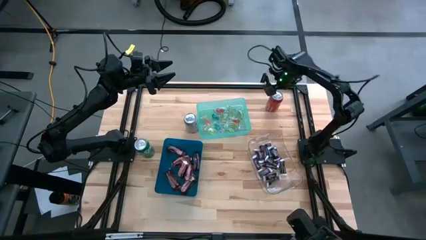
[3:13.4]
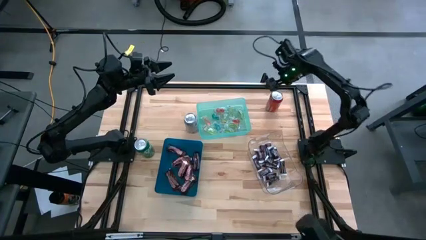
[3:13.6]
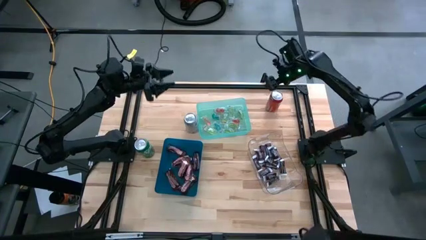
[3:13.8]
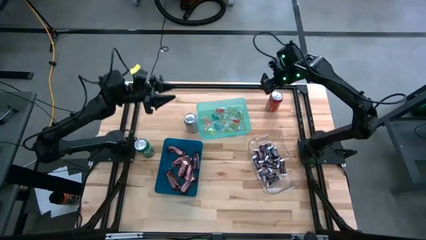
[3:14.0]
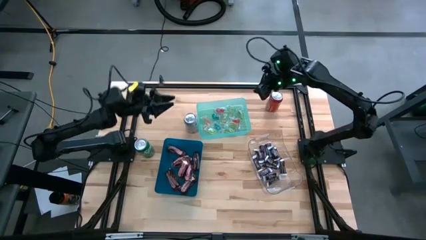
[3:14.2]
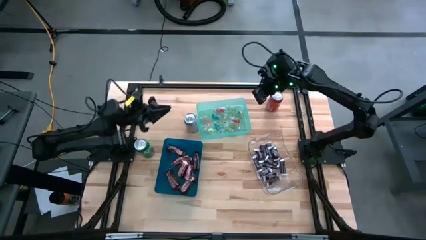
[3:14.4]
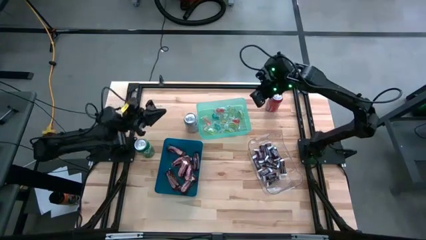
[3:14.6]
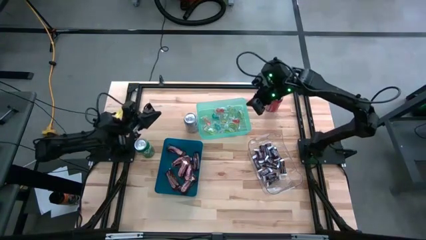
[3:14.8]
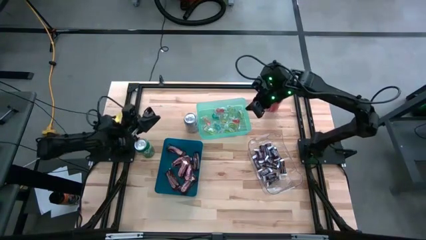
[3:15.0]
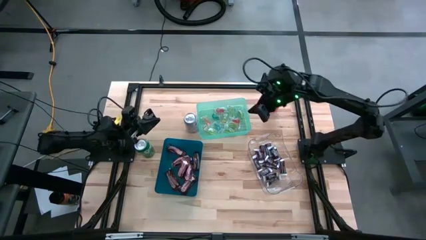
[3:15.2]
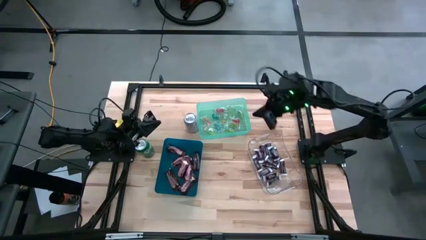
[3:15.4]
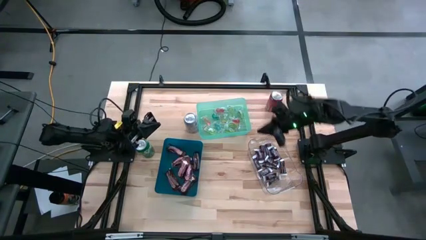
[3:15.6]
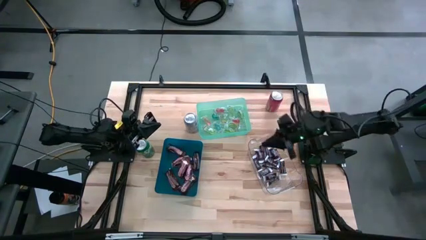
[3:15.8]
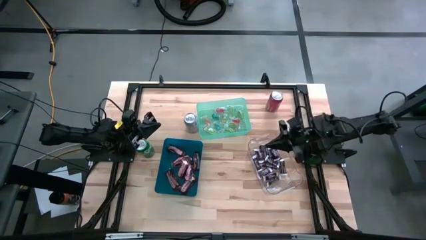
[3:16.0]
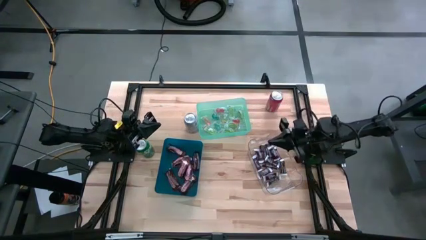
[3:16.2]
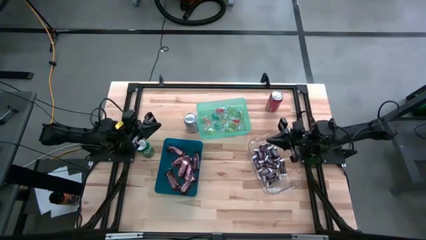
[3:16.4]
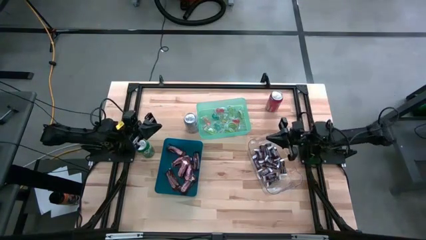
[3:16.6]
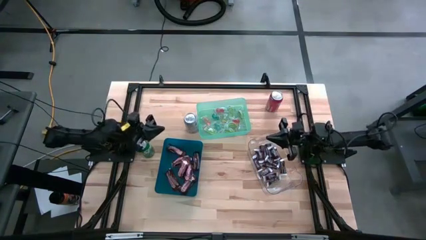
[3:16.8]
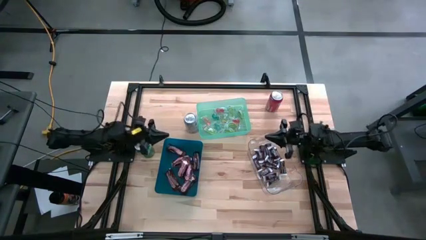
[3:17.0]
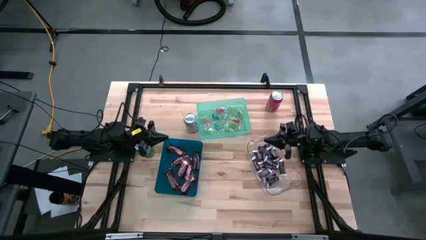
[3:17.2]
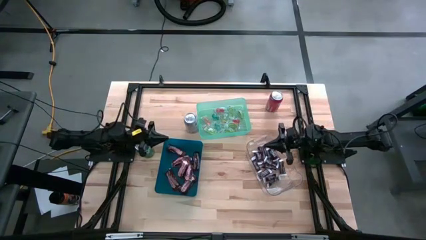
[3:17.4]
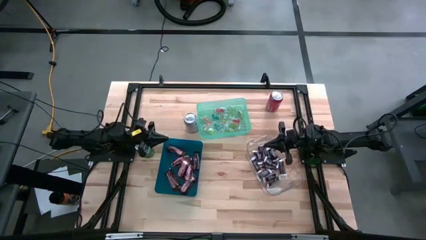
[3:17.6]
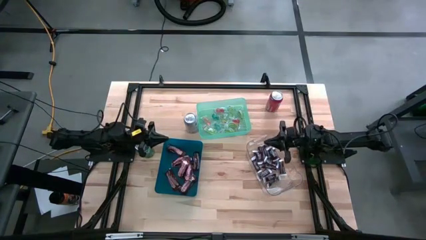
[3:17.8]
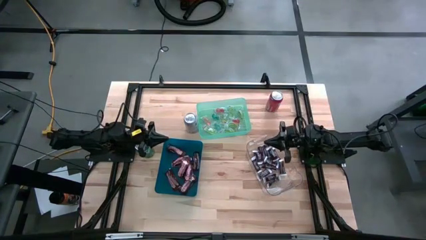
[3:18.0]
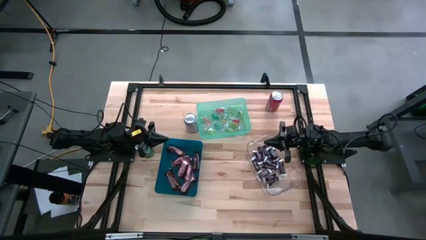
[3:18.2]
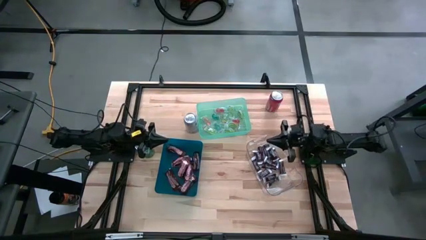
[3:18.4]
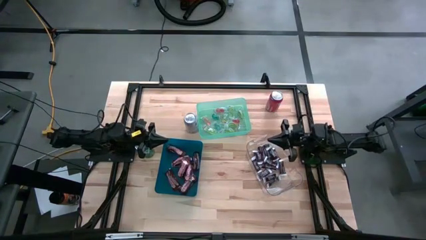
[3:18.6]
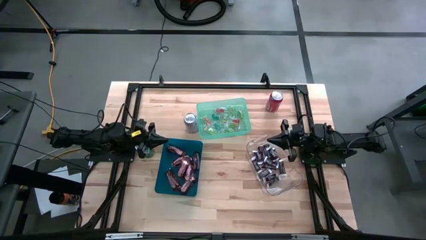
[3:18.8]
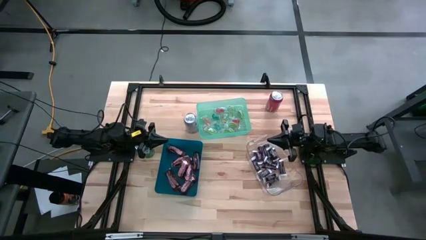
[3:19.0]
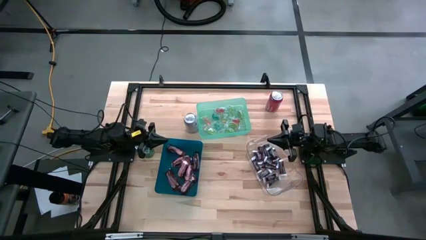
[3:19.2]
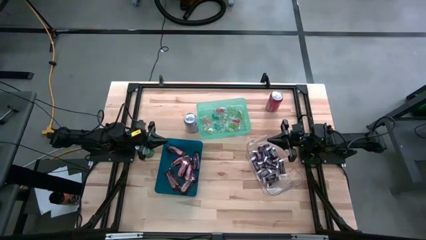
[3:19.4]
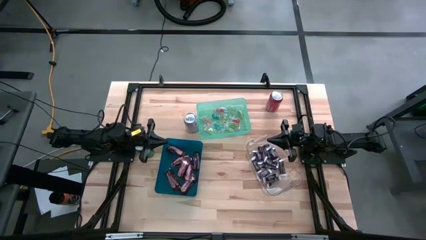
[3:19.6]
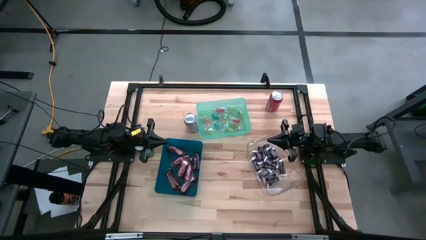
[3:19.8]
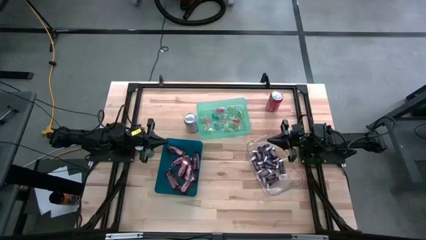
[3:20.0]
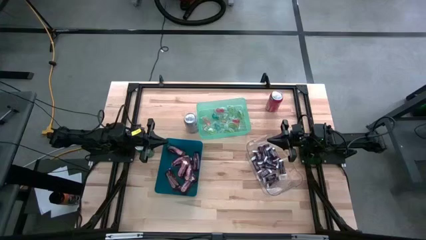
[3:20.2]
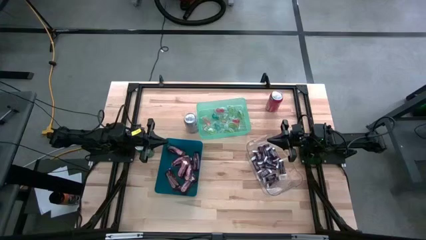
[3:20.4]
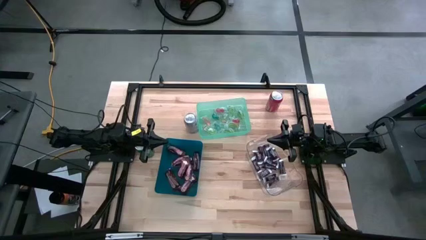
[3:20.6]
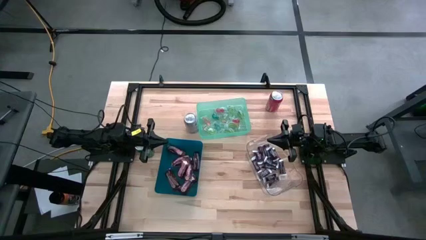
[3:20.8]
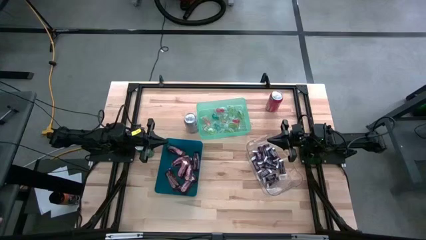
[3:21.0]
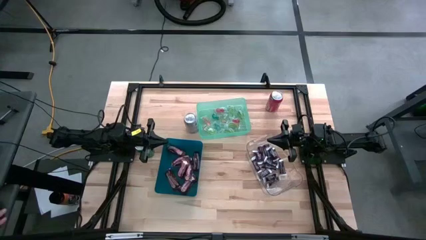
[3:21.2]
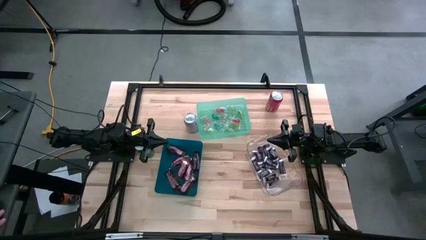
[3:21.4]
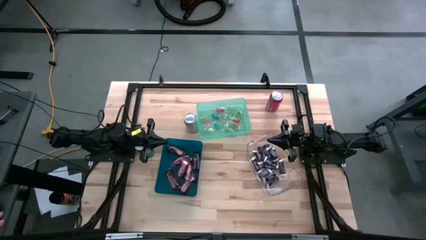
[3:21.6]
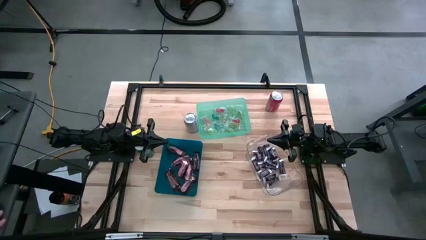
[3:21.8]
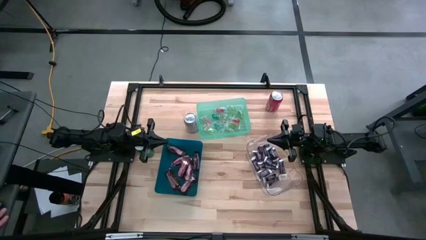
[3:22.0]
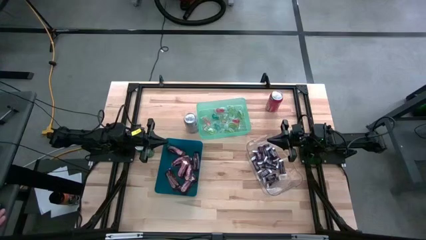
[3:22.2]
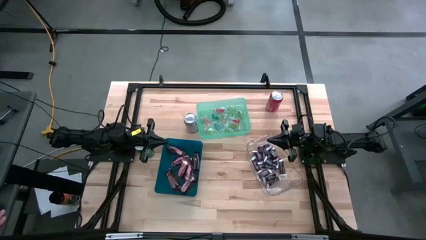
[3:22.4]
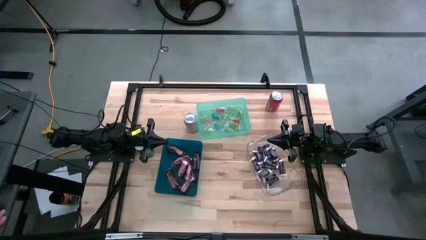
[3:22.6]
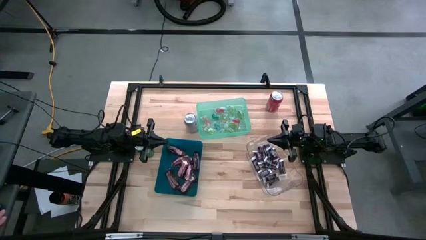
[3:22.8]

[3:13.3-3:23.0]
Task: Organize candy in baskets
Return to Home Position

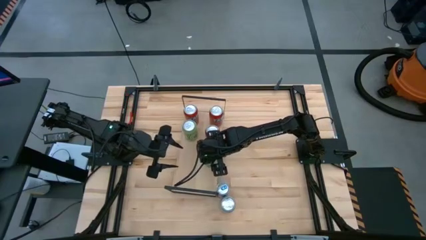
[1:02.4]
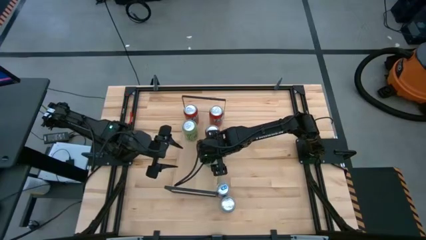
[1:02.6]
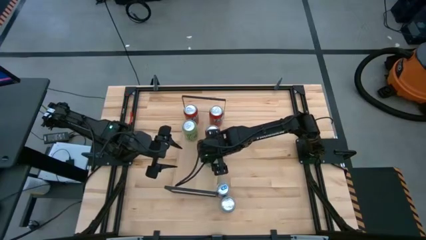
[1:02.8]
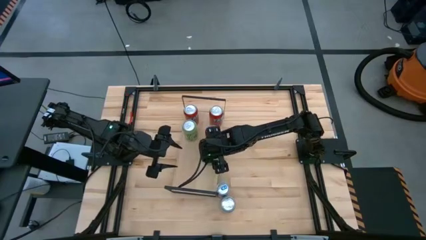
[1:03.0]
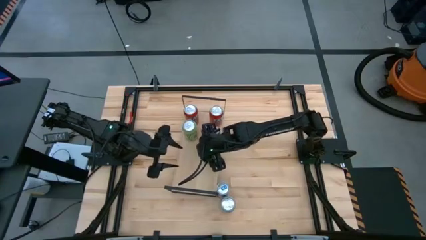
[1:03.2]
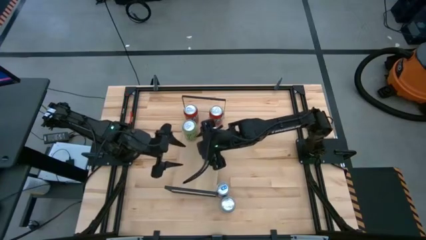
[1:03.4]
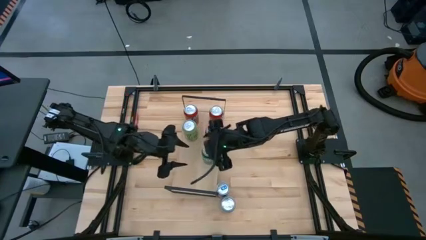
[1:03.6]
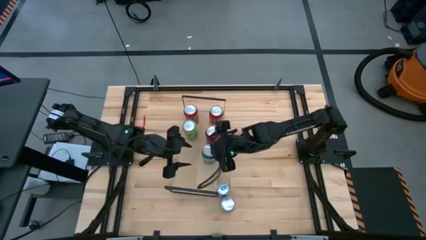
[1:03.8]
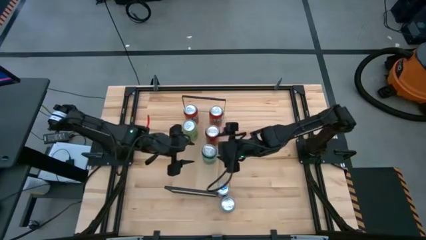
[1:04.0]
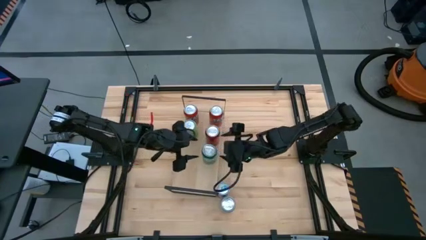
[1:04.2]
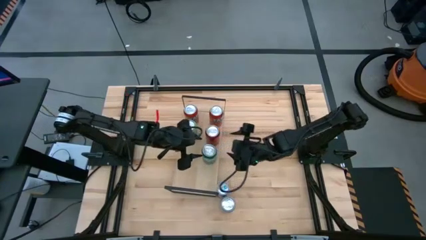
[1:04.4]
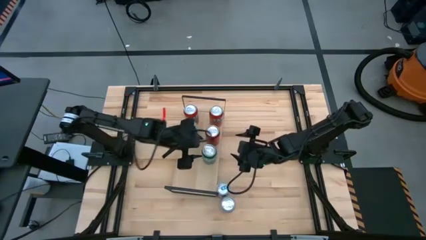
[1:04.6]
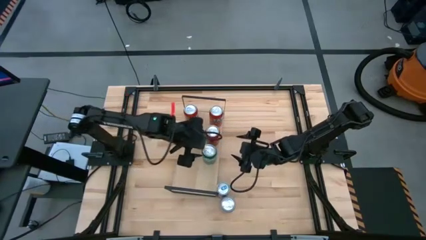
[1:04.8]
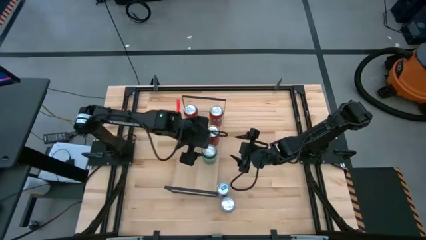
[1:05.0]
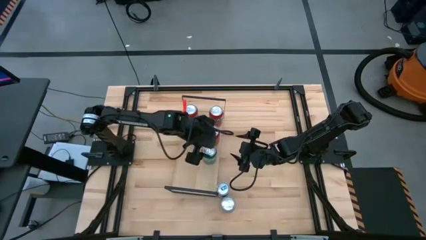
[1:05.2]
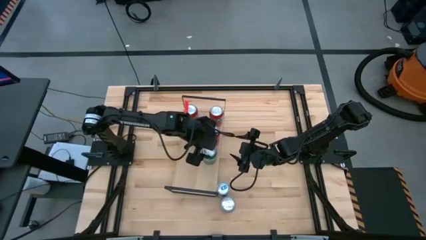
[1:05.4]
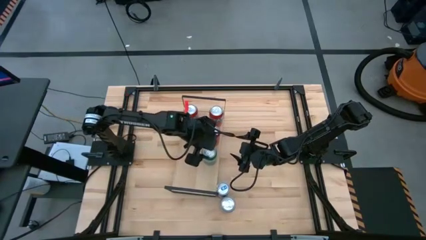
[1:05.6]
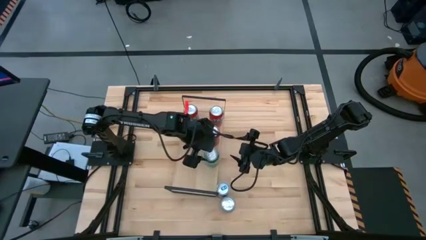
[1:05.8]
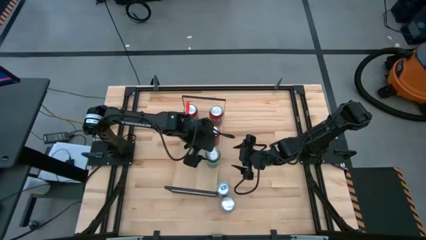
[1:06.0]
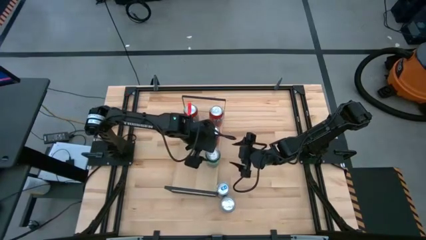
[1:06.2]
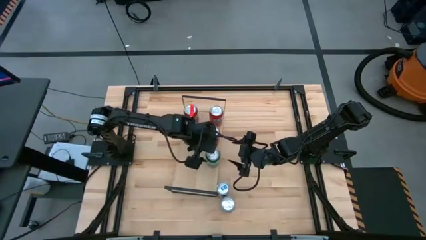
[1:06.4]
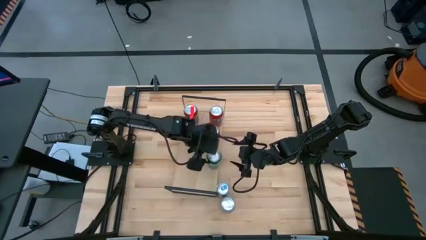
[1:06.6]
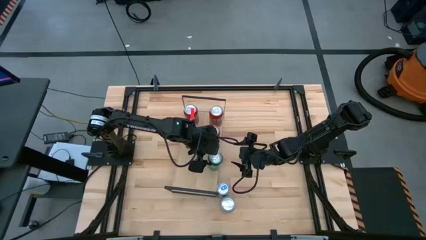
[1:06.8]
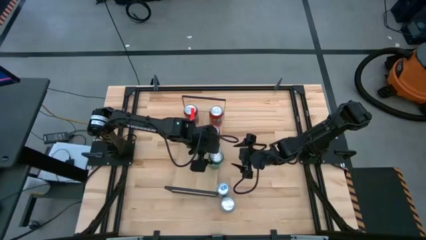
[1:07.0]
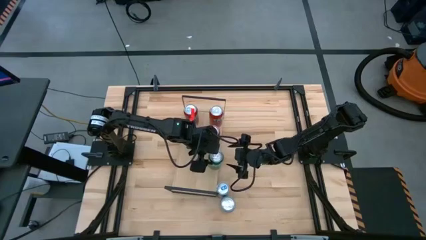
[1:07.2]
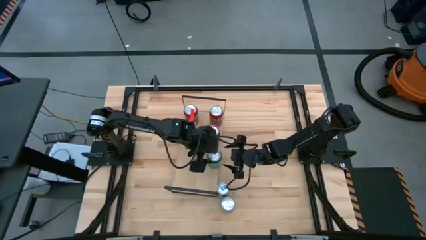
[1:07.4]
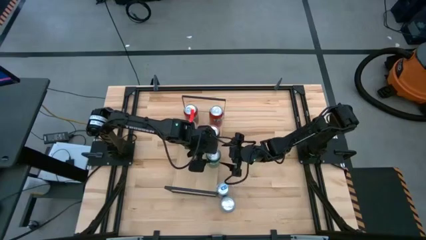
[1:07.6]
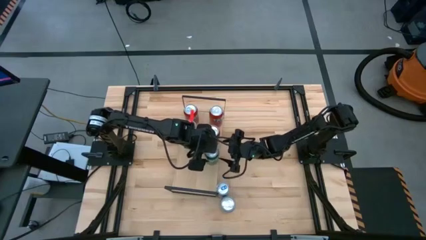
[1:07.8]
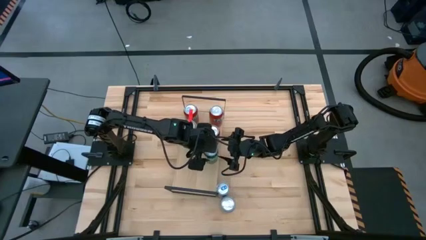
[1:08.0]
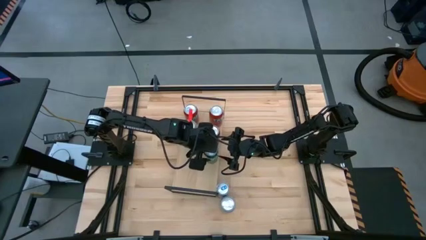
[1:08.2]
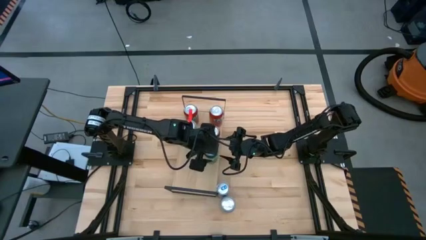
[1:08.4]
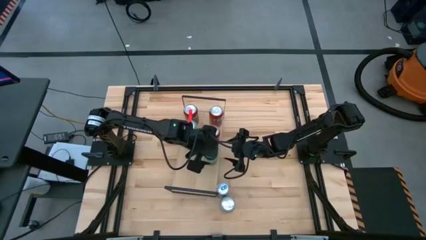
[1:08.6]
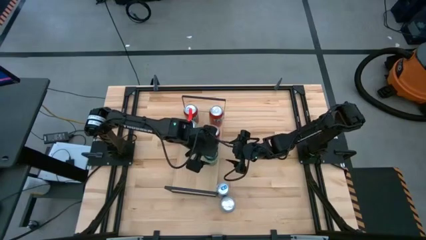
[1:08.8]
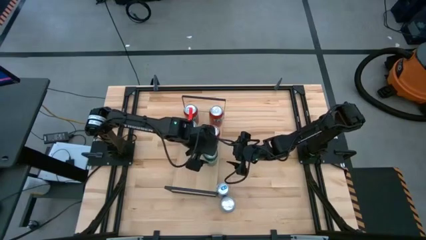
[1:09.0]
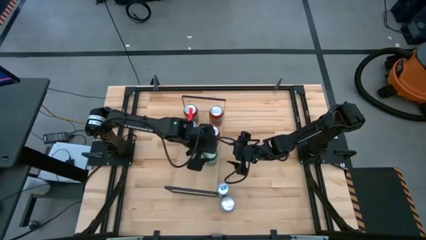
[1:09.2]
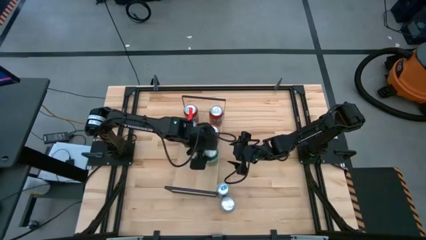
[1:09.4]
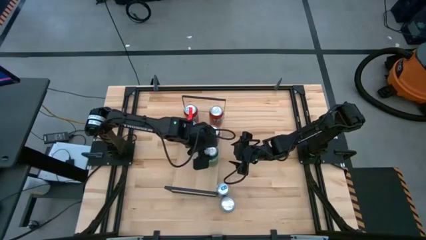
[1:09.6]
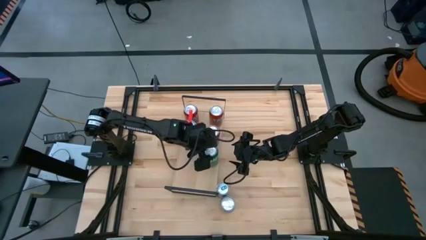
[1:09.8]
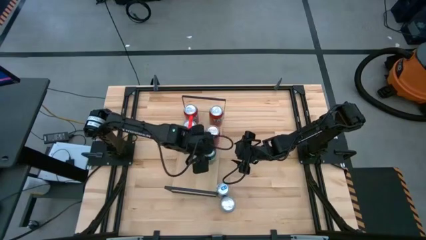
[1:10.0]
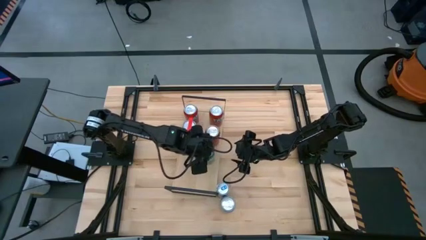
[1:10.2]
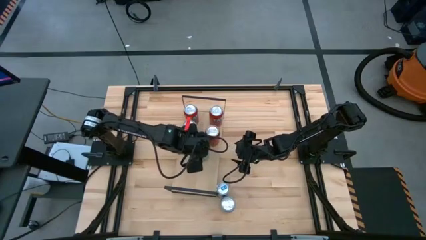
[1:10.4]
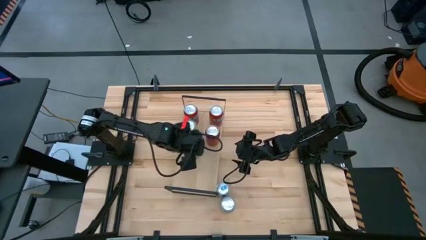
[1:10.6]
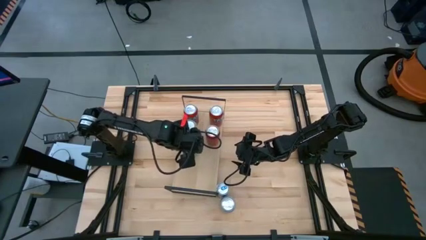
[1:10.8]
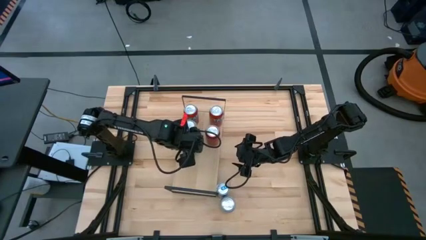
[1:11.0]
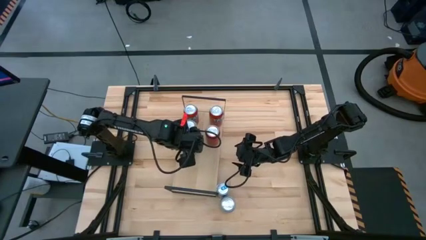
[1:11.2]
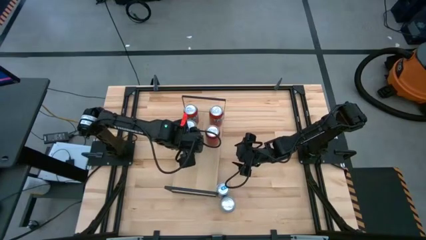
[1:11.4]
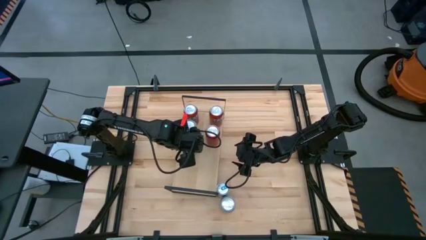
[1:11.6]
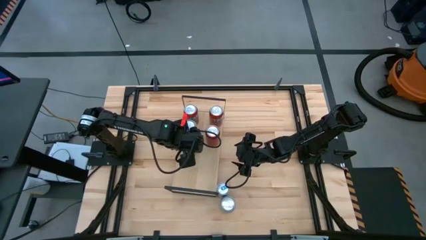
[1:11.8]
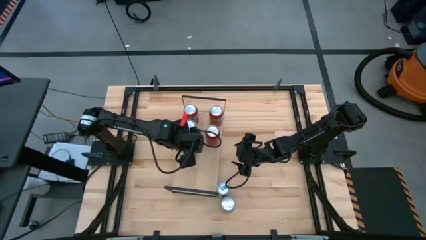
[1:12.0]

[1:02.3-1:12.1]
Task: Place canned beverage on shelf
Put the green soda can on the shelf
